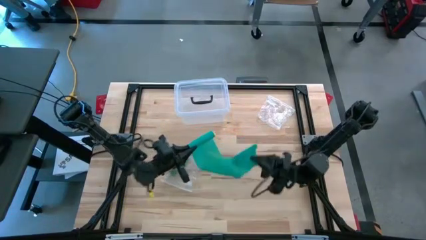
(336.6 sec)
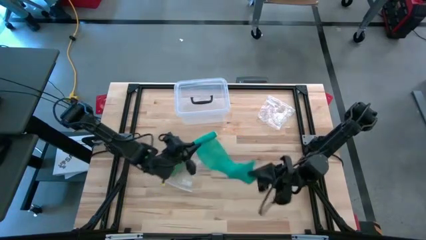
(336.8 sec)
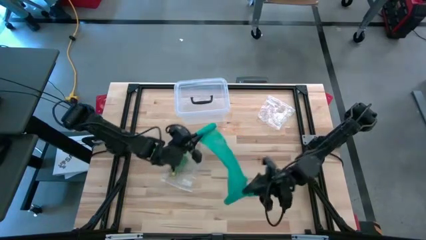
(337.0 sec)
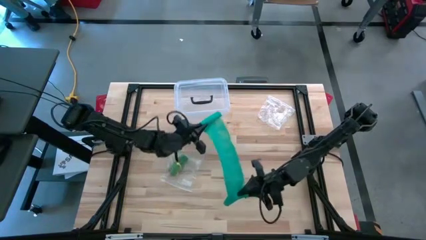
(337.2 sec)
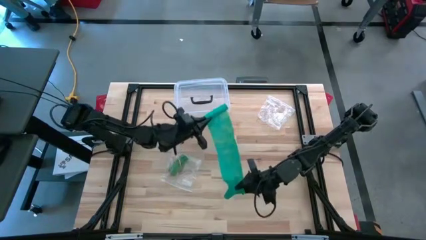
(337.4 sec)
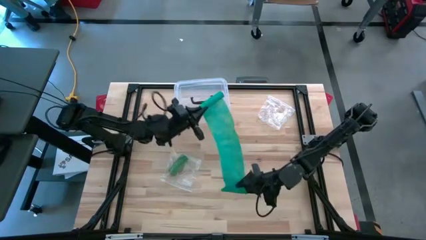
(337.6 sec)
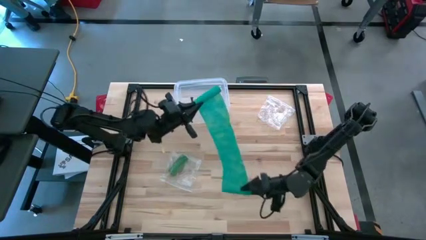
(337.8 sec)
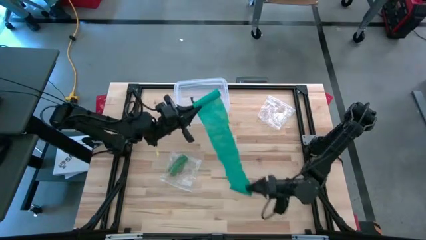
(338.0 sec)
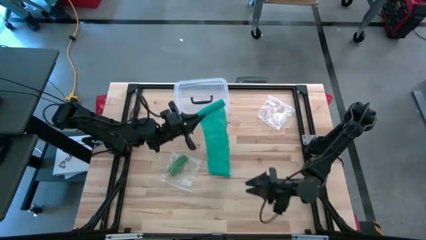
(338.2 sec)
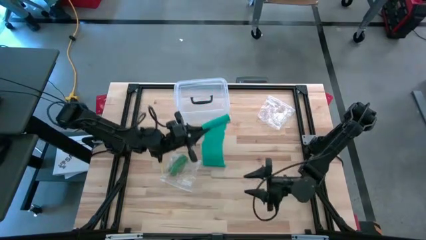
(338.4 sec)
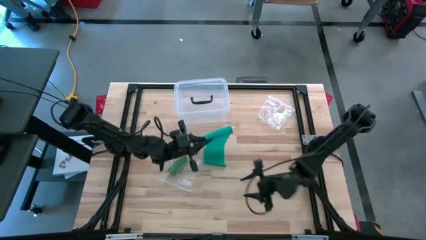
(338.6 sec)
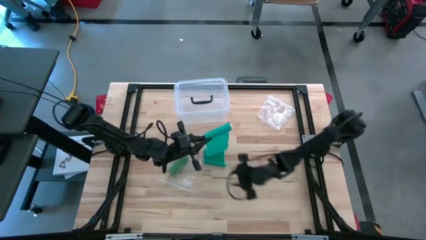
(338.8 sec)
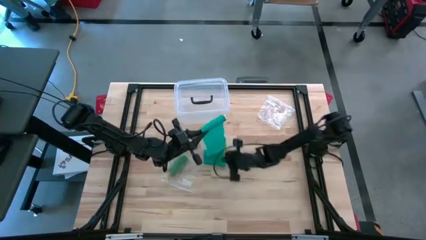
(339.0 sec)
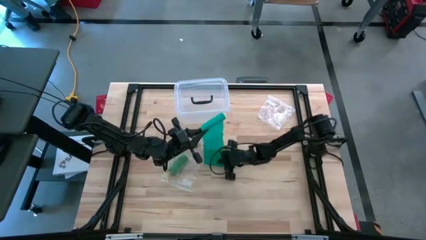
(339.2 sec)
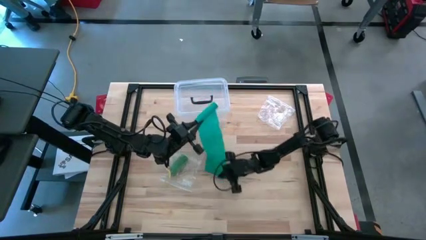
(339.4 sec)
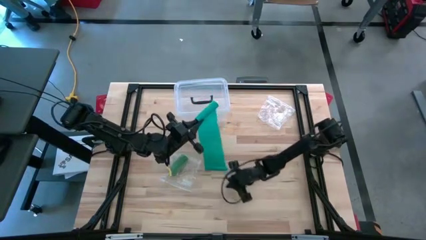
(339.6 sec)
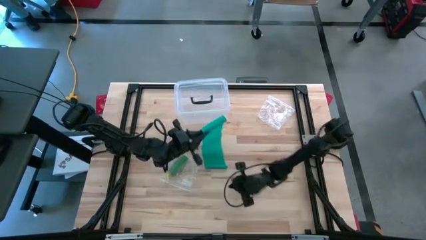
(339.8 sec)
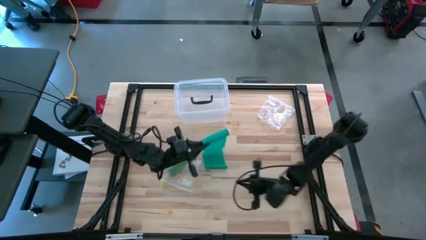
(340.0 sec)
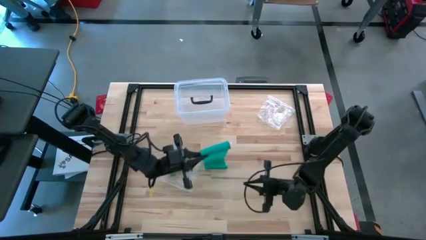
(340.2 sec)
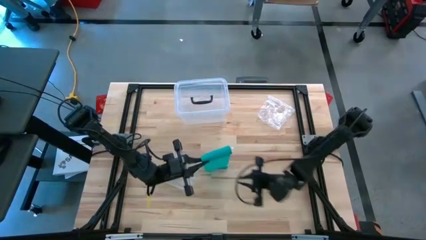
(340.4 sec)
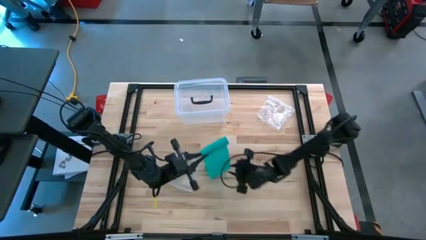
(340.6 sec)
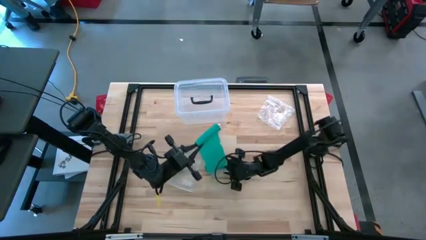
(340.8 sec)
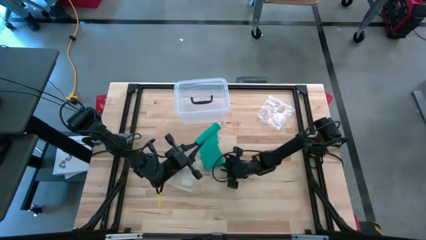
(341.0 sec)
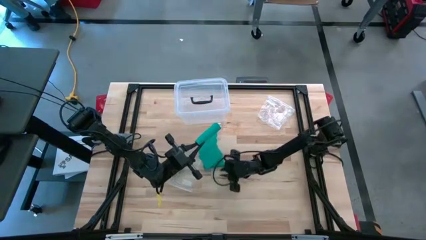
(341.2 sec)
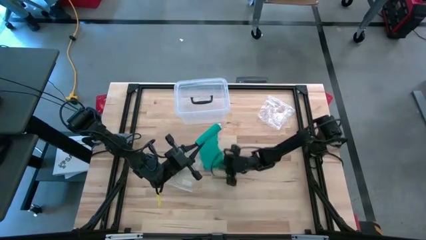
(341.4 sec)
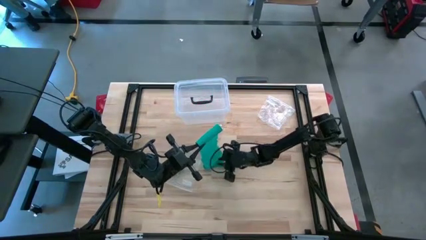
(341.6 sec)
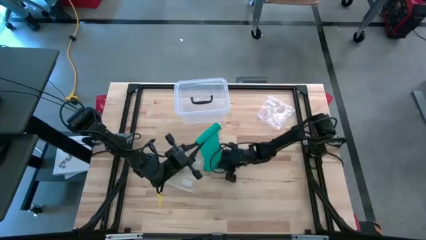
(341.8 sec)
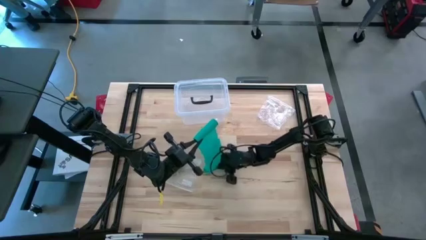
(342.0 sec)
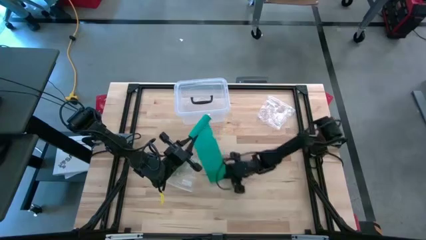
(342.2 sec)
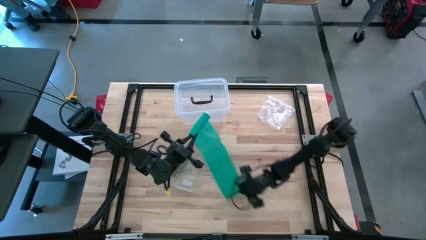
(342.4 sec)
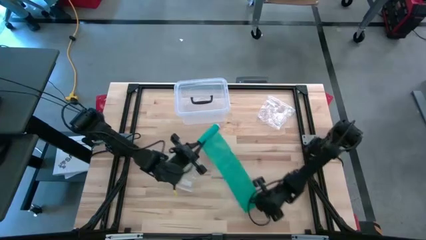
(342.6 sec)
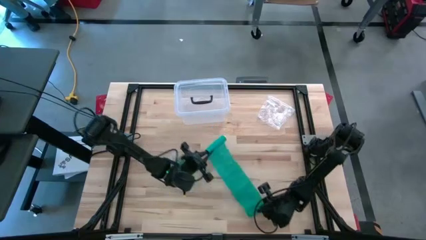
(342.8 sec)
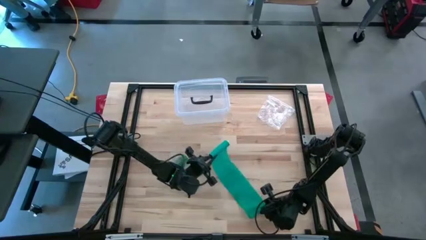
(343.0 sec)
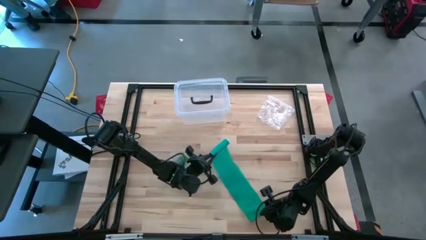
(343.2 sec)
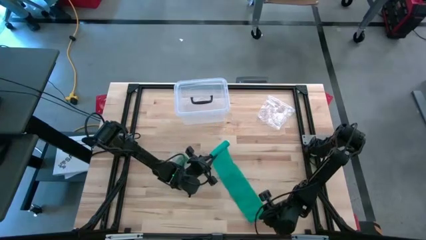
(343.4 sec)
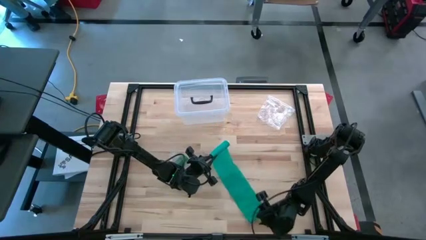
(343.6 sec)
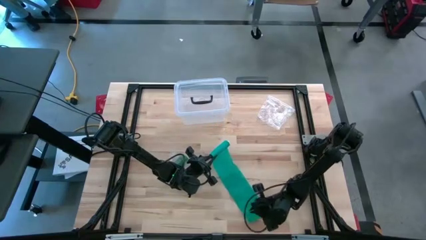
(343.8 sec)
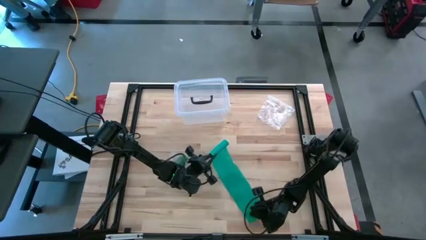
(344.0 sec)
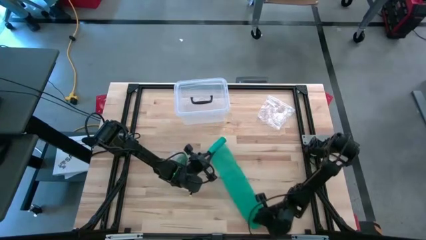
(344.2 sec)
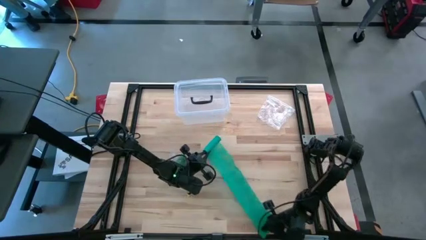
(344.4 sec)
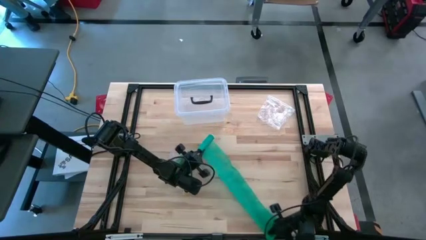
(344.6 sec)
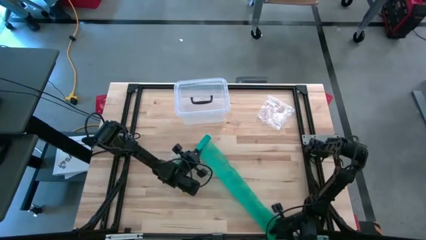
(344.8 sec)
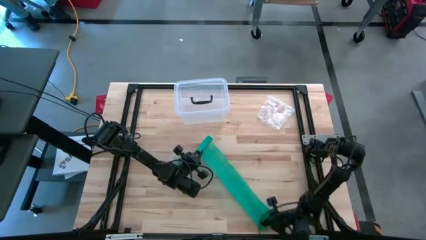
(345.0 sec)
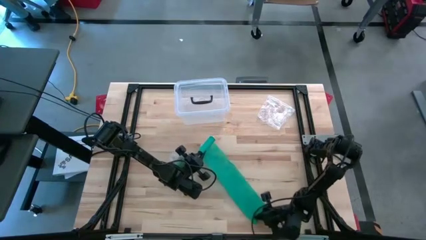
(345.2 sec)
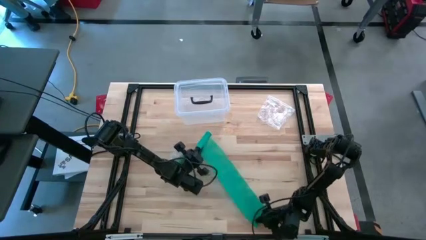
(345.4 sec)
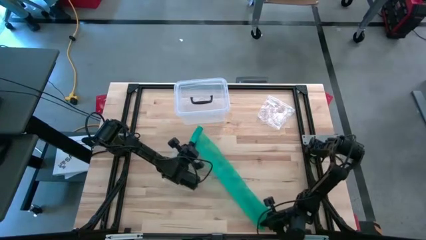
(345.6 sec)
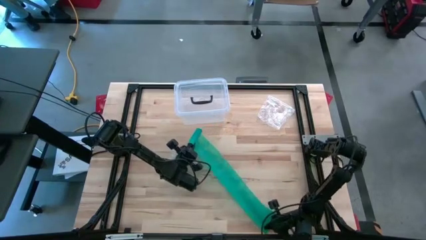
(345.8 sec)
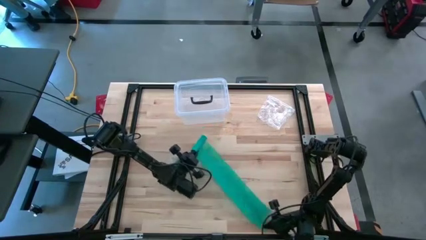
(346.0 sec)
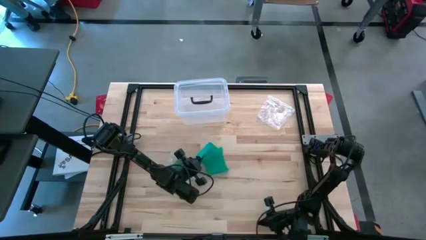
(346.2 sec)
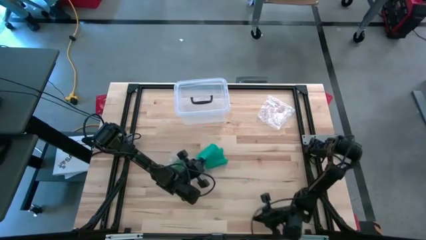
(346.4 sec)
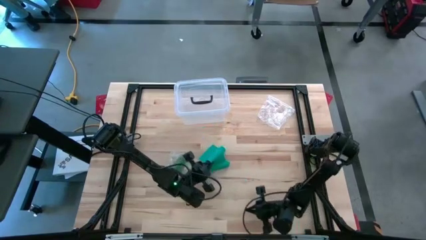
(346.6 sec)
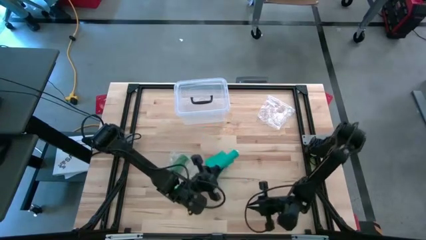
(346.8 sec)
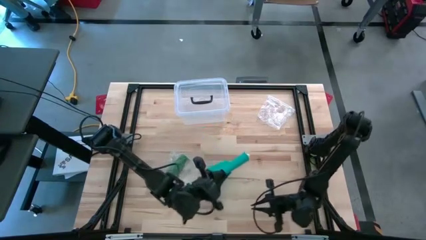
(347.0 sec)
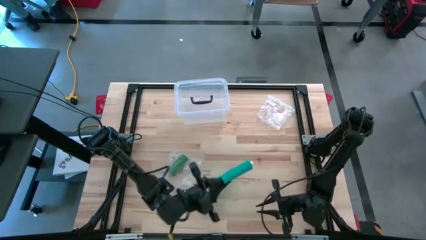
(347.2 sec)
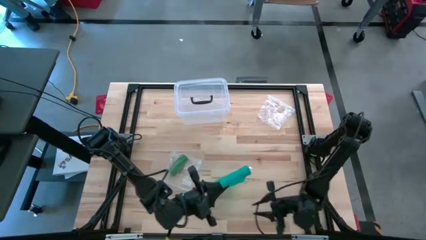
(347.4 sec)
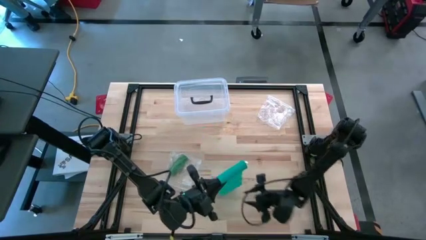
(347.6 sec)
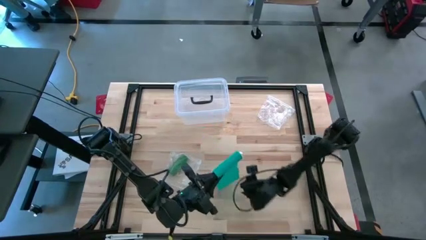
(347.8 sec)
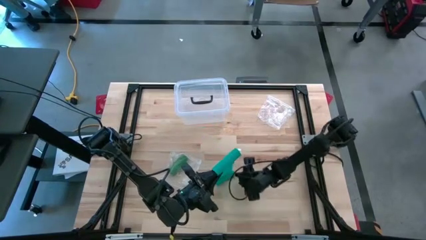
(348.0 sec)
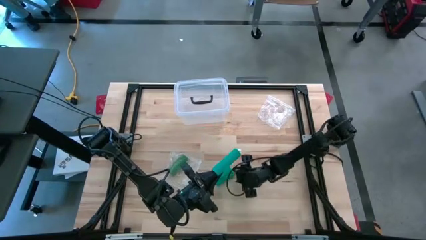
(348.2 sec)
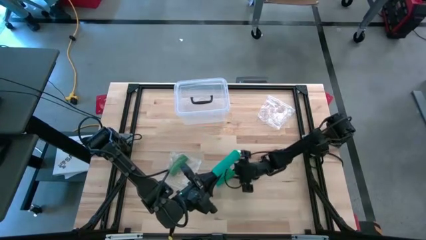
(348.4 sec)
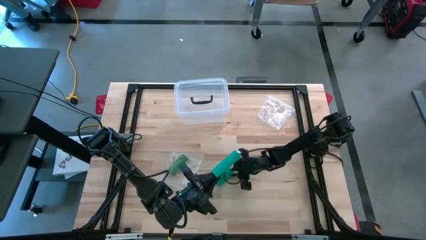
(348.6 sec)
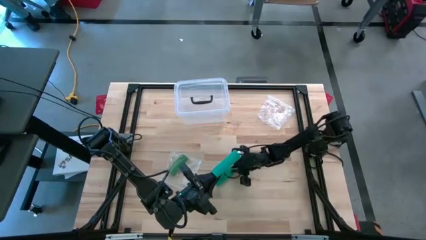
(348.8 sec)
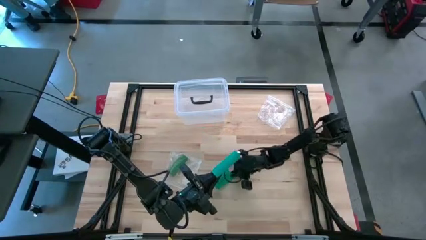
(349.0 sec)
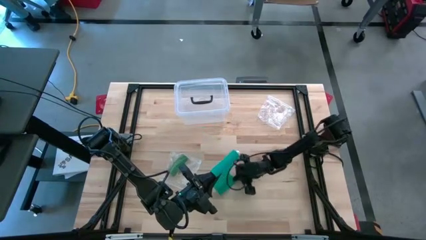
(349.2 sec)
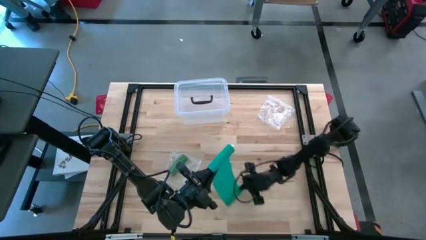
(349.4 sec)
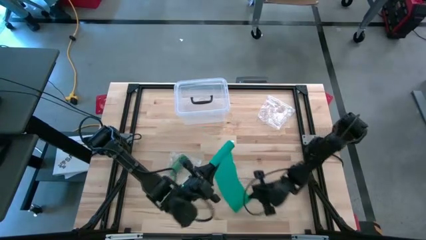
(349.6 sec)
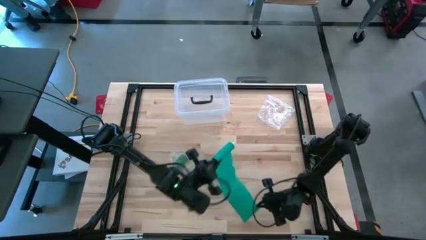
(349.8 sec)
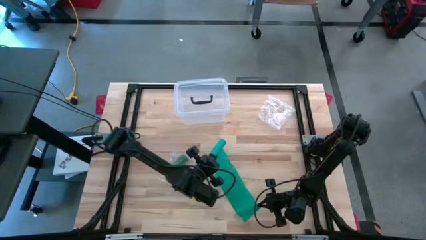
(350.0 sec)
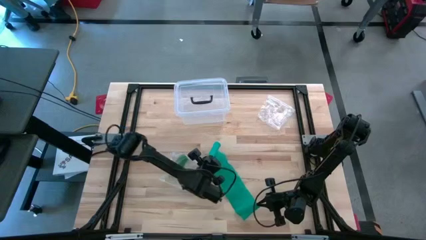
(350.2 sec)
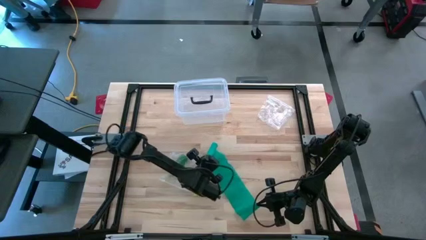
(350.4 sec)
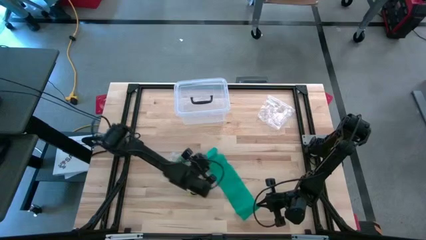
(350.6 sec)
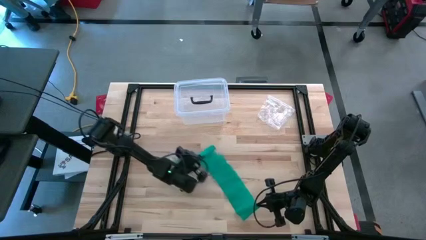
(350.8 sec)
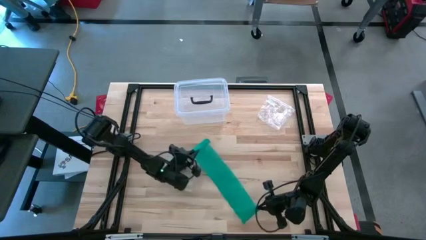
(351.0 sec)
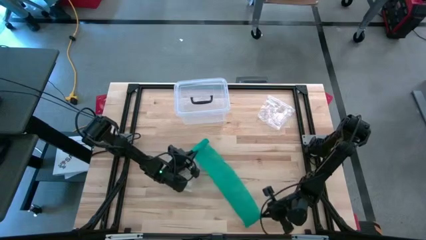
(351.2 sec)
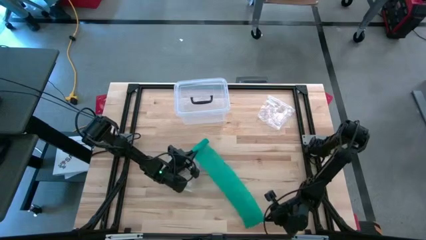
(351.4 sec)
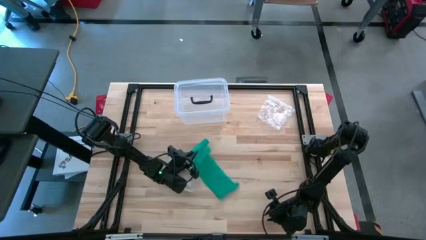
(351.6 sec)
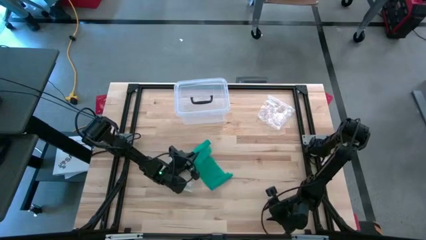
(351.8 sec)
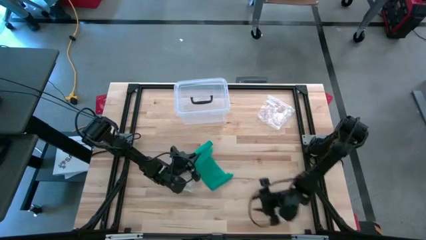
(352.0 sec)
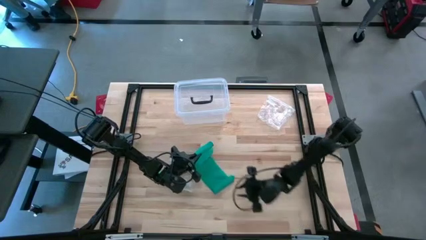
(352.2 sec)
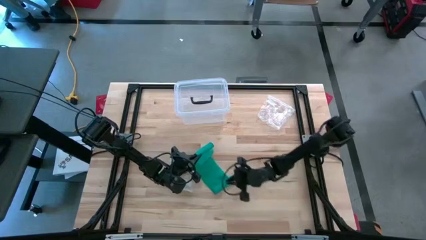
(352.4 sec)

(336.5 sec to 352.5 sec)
Task: Roll bandage
Roll the dark green bandage
